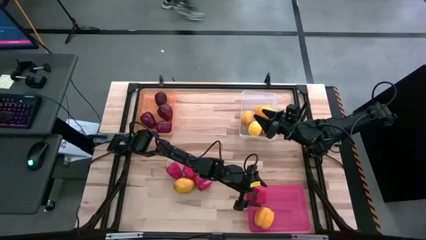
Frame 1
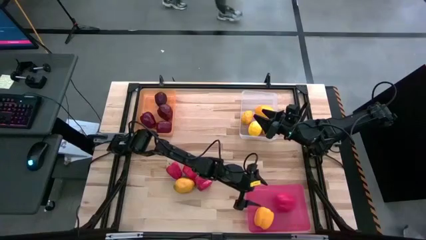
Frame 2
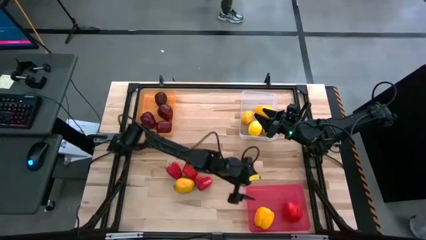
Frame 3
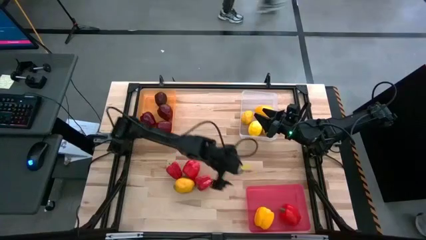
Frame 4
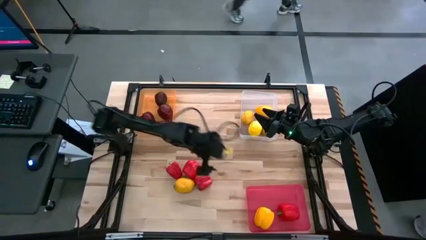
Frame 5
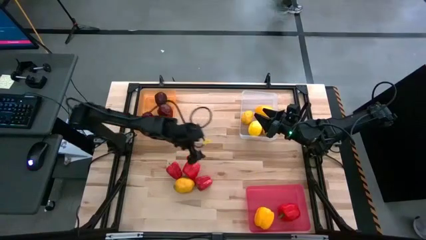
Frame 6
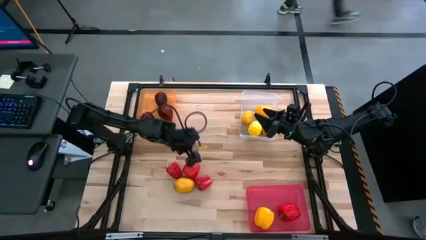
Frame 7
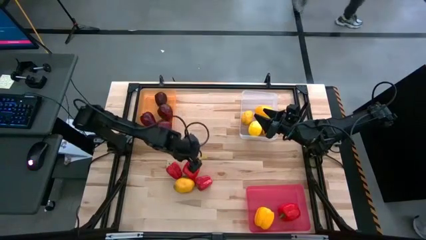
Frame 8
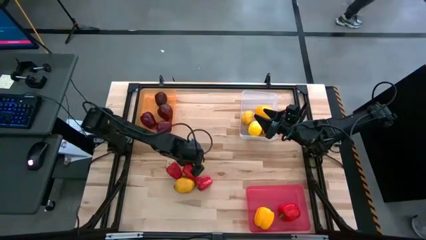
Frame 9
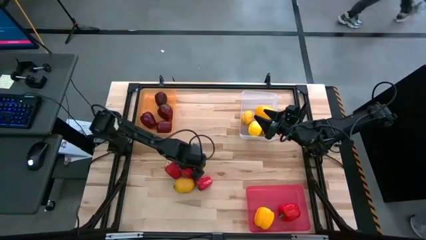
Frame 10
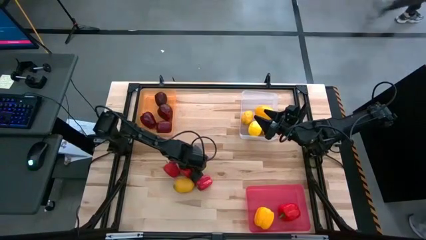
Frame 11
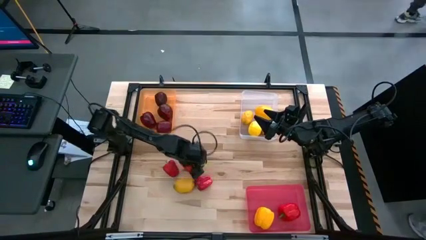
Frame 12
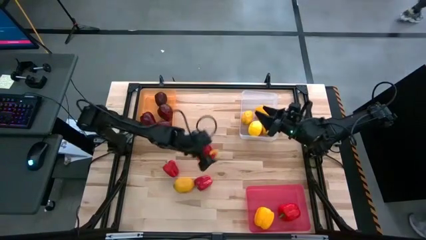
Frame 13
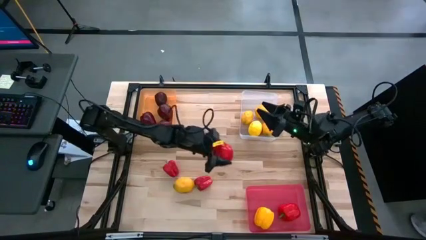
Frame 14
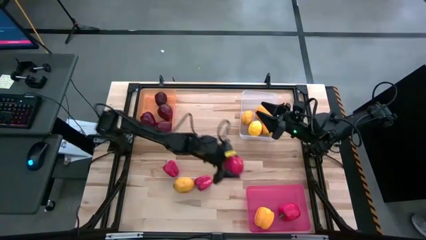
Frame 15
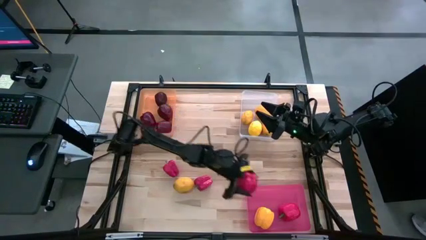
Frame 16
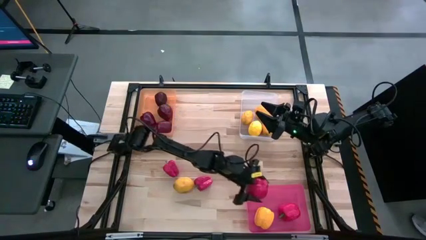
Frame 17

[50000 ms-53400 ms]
Task: Sort produce into baskets
Put the red bell pepper into the red bin

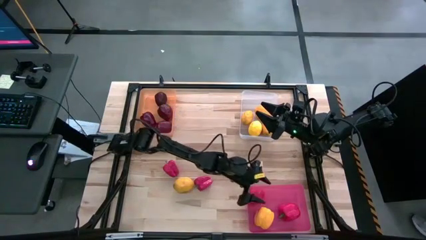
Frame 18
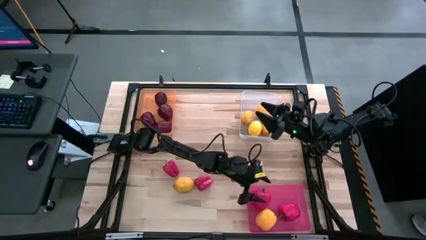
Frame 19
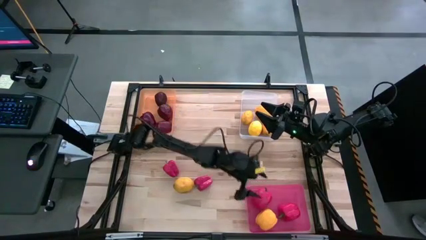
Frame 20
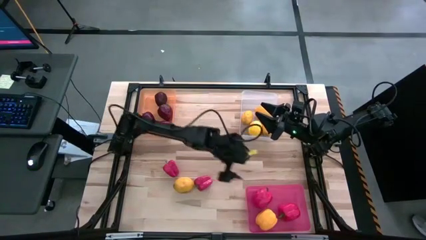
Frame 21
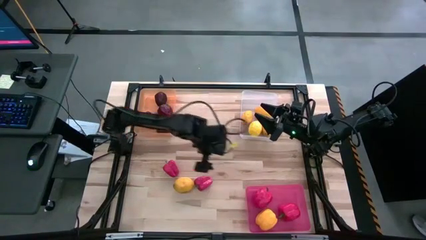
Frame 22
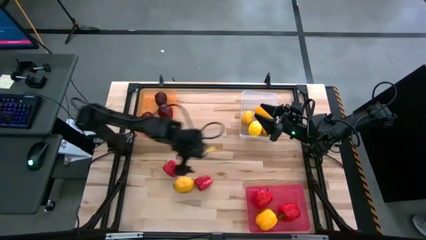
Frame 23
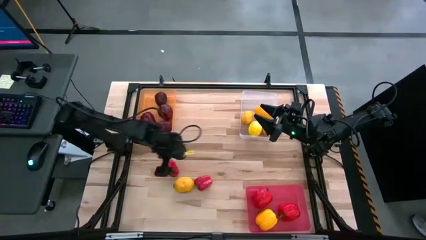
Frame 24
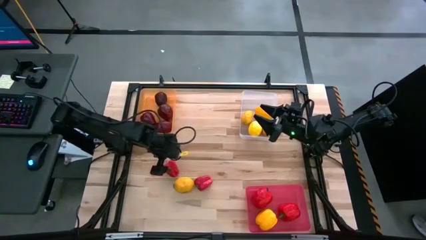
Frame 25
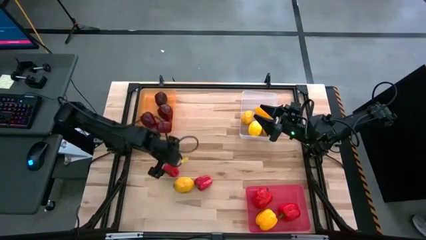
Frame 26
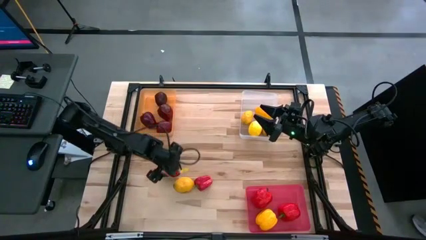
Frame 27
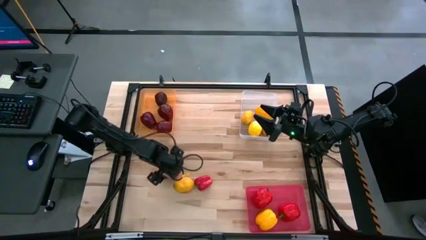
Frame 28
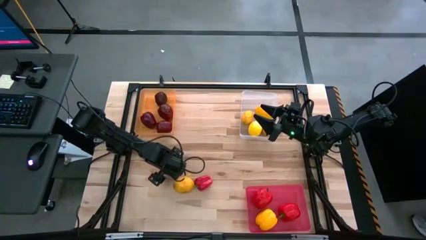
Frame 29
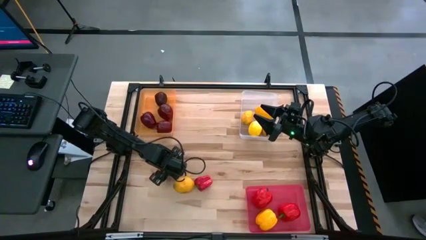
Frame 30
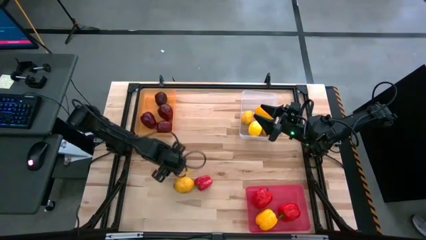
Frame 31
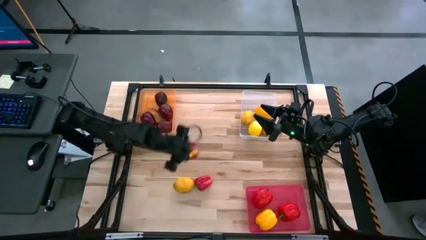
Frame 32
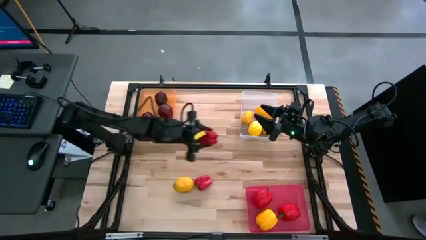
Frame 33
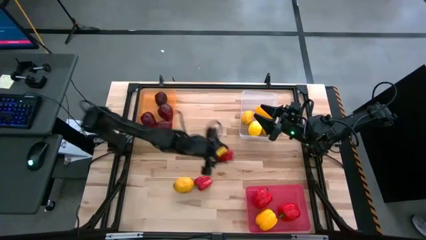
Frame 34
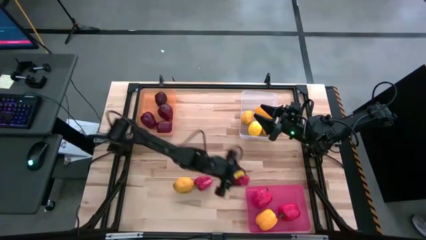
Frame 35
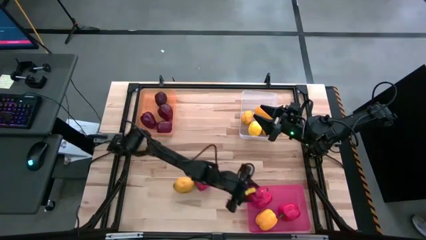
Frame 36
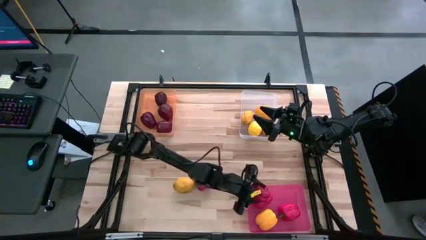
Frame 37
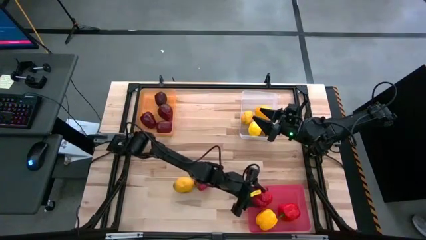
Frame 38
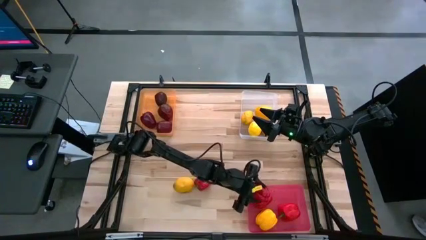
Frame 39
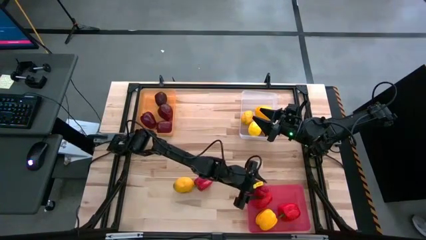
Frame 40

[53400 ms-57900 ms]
Put the red bell pepper into the red bin

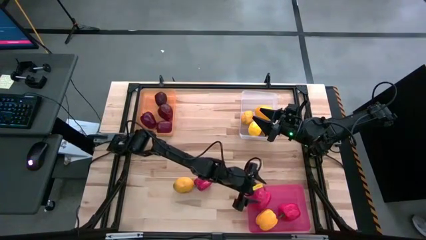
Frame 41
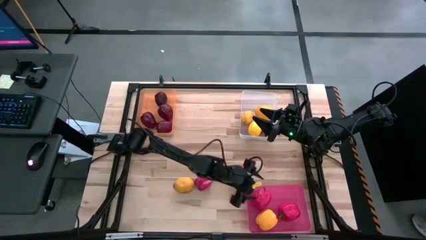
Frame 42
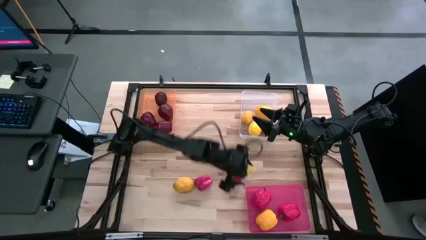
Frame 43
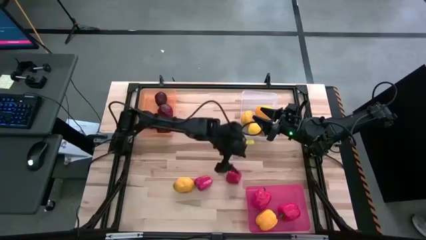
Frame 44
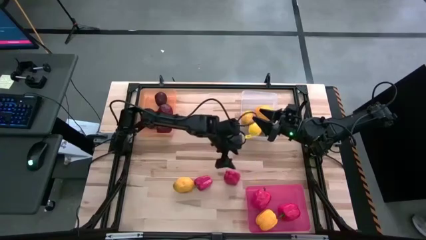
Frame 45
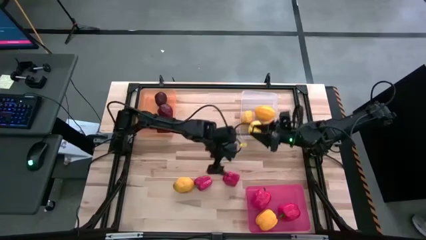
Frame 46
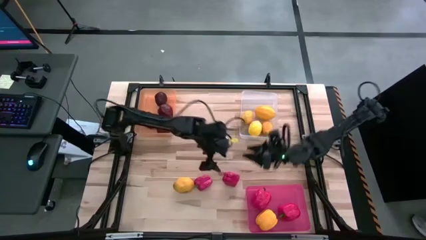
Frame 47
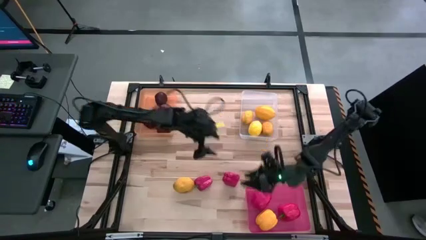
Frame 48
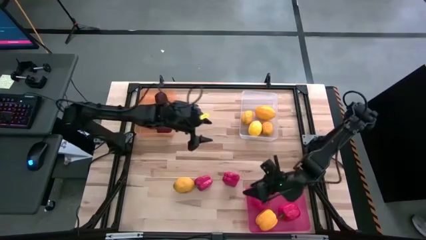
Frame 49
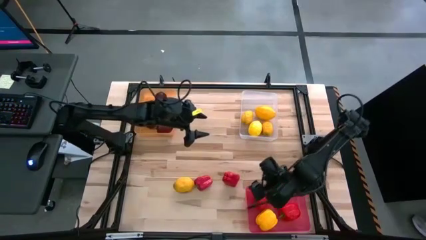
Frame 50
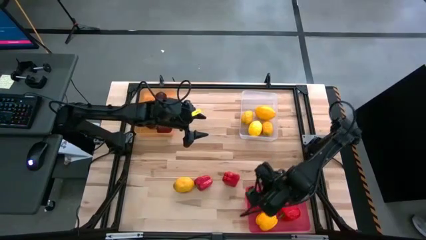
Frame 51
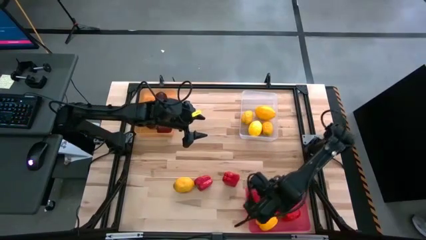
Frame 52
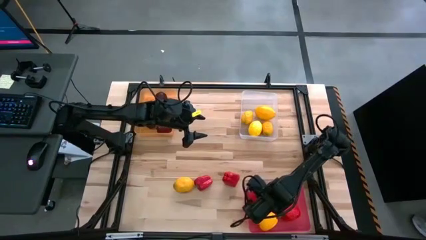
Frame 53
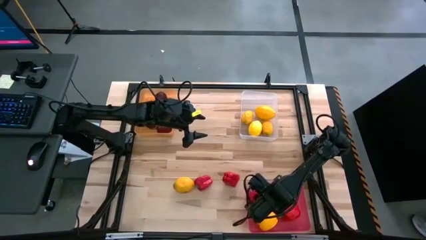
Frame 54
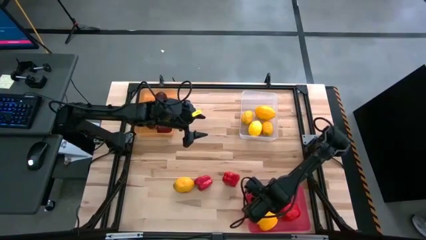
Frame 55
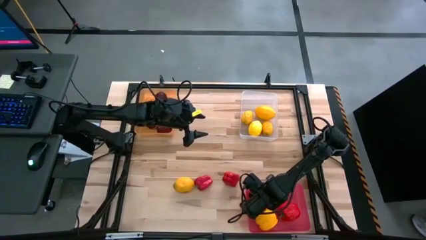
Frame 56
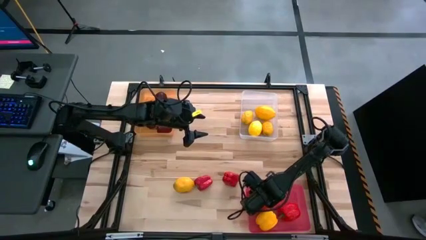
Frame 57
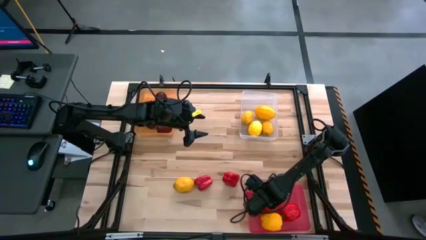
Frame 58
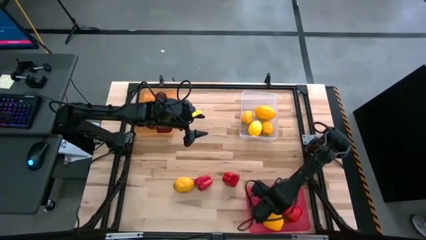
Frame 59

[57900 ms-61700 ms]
Put the red bell pepper into the red bin

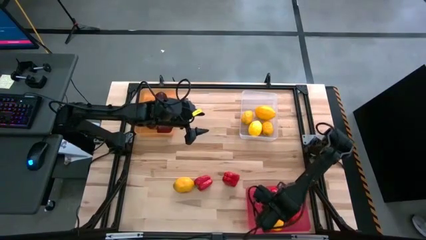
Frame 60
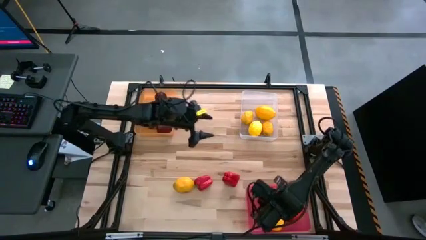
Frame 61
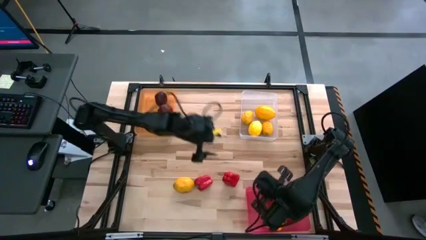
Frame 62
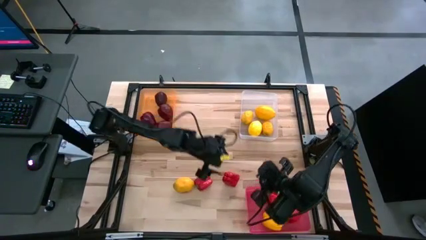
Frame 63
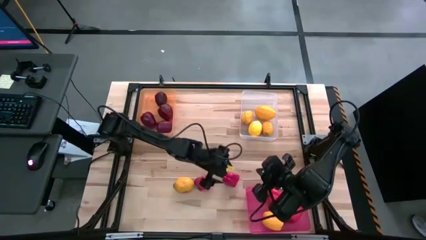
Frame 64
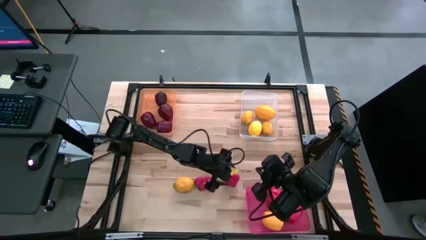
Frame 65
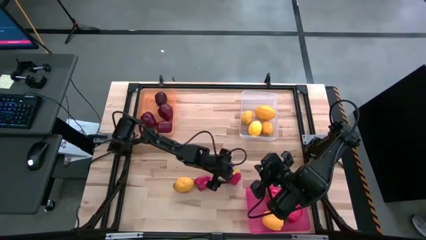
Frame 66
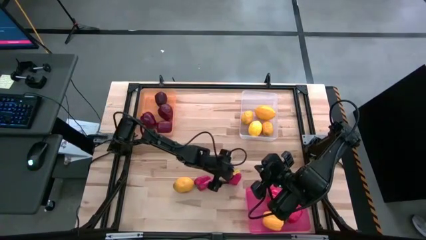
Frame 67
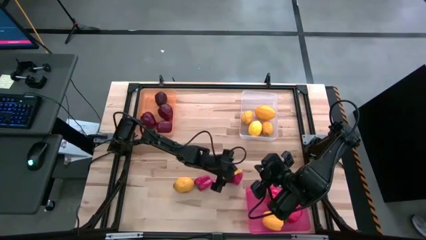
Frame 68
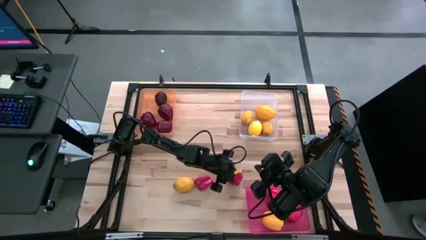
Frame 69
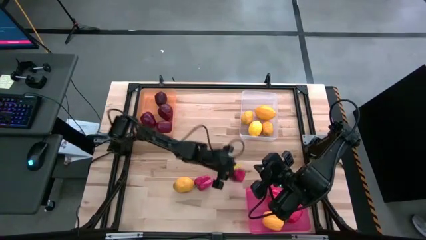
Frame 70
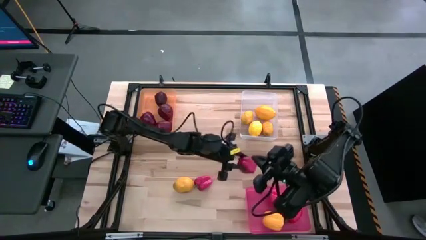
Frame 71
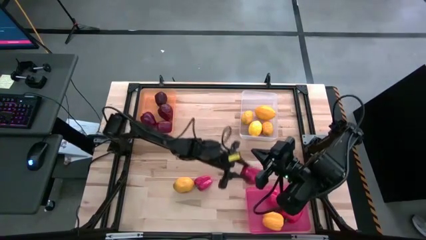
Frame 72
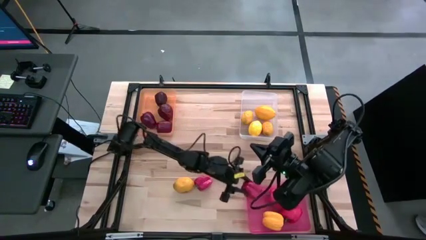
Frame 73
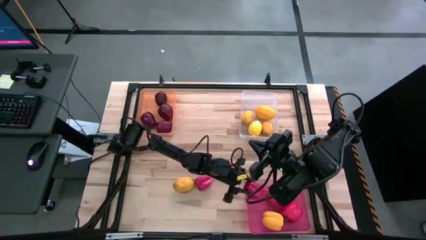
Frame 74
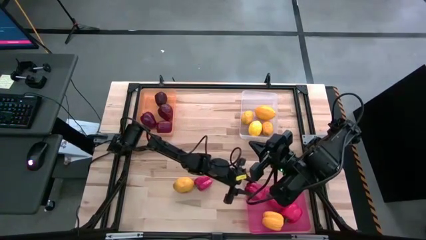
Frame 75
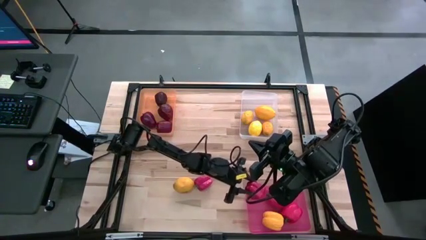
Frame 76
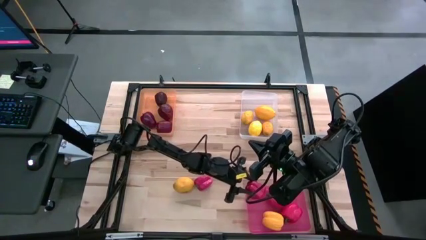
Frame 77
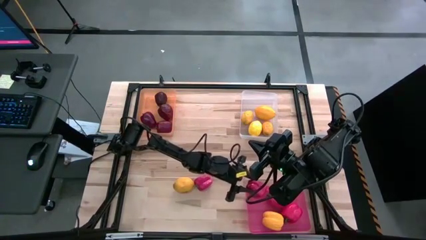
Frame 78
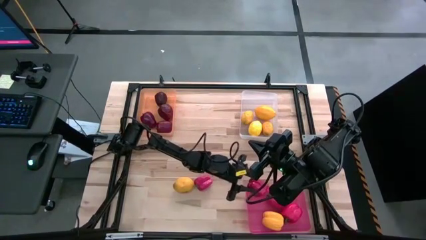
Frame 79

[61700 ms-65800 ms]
Put the red bell pepper into the red bin

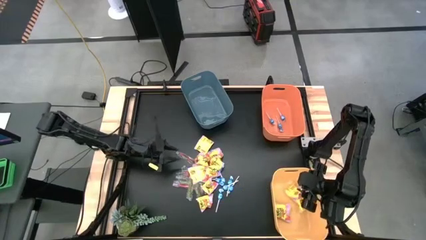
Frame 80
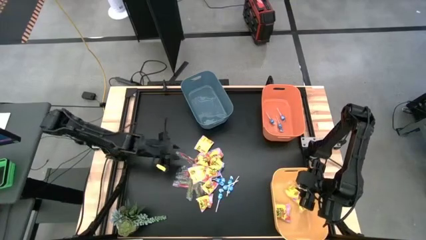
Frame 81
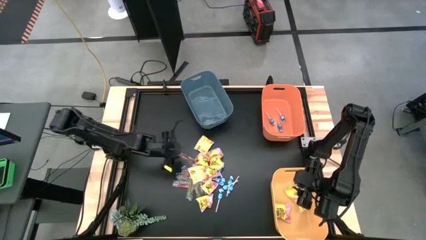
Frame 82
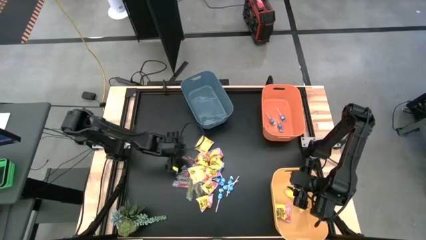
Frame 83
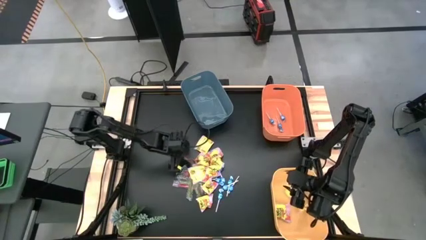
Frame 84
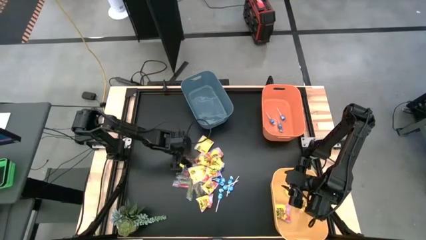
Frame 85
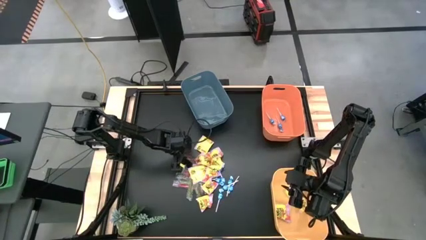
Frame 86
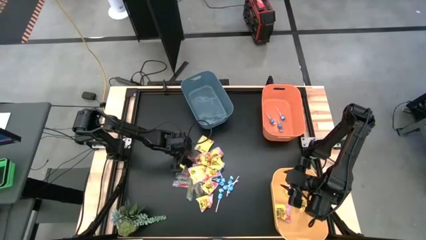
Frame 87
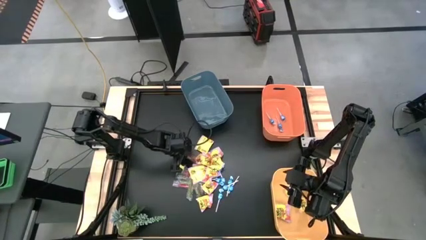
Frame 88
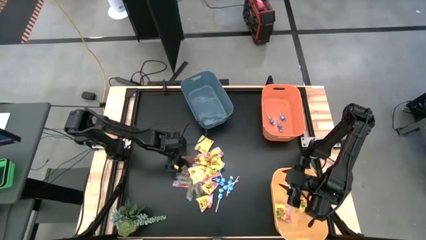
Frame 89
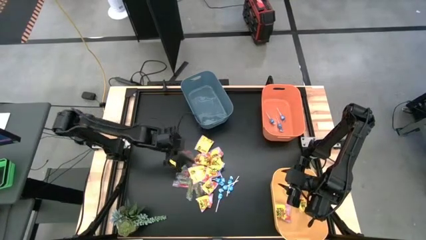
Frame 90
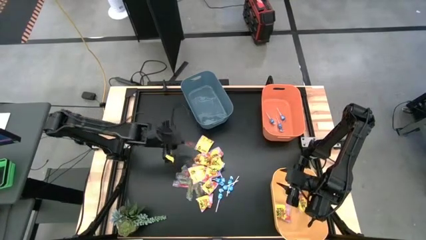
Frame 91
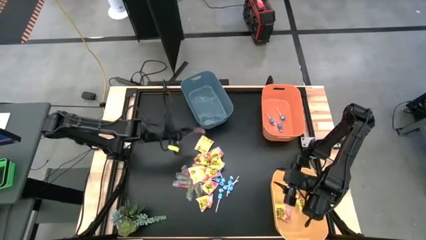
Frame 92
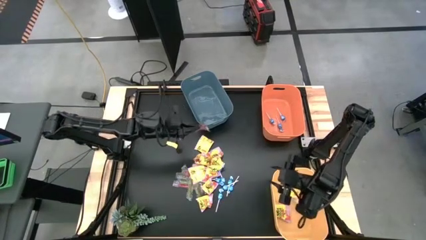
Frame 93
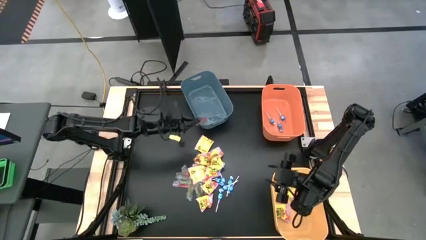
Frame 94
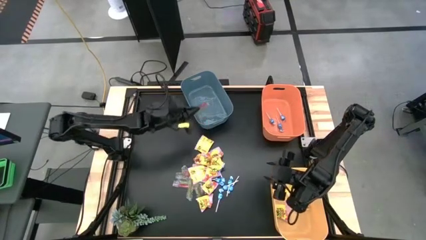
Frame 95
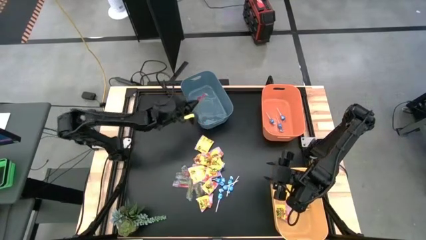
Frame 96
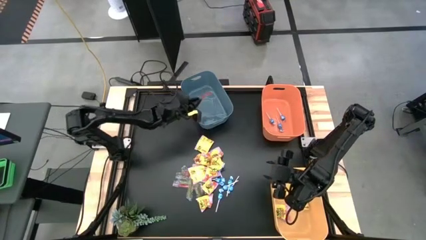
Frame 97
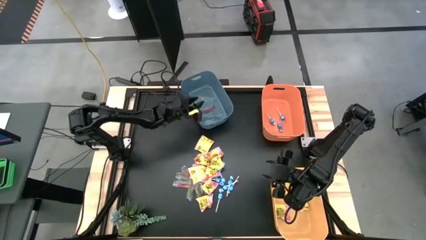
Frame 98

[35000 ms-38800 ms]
Task: Sort candy
Put the transparent candy into the blue bin
